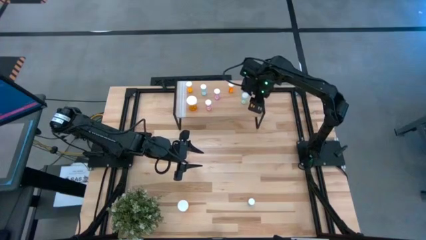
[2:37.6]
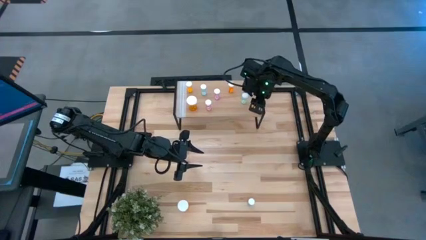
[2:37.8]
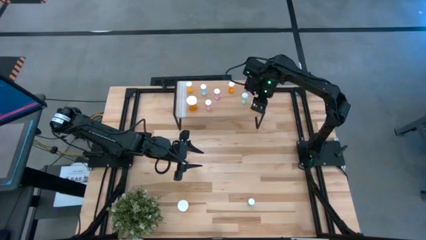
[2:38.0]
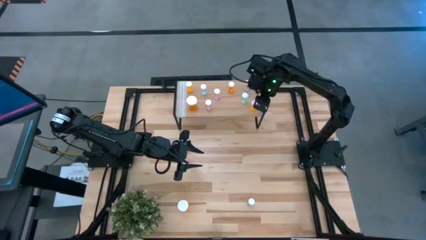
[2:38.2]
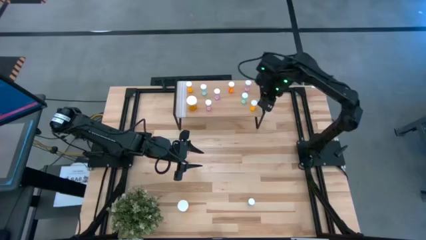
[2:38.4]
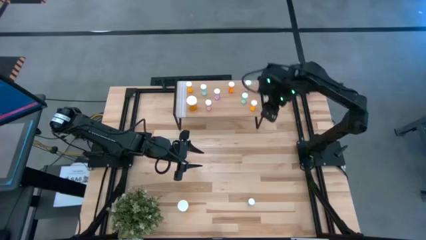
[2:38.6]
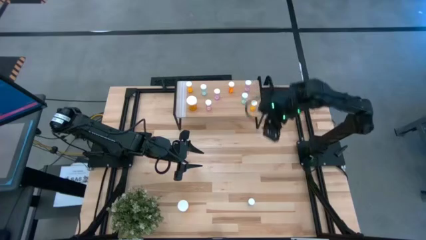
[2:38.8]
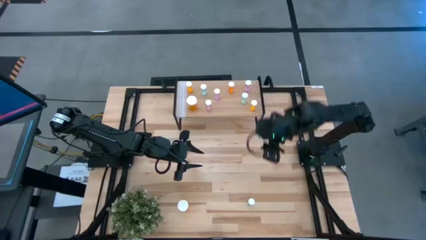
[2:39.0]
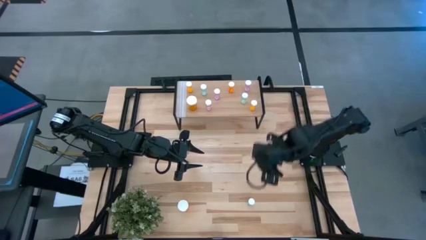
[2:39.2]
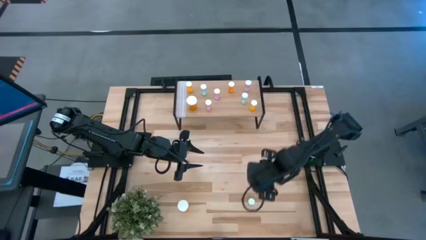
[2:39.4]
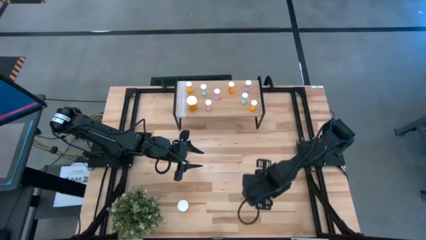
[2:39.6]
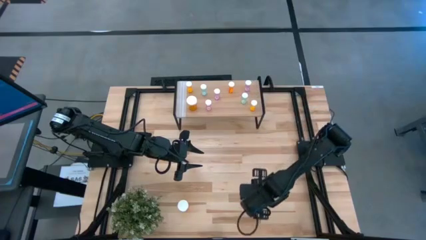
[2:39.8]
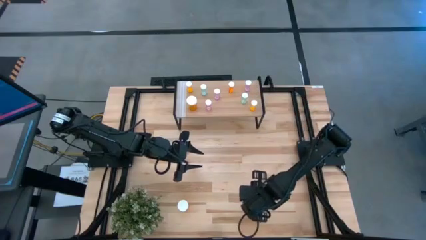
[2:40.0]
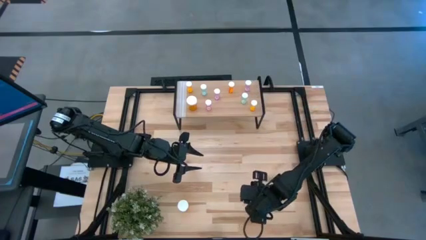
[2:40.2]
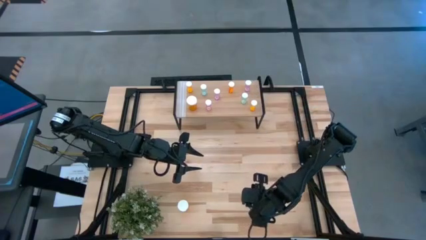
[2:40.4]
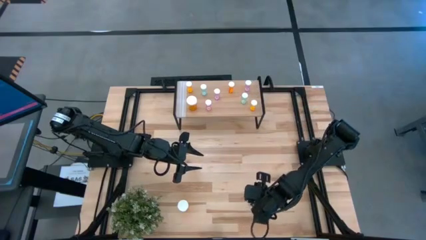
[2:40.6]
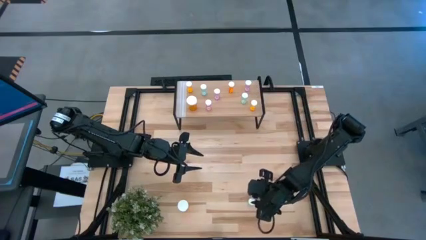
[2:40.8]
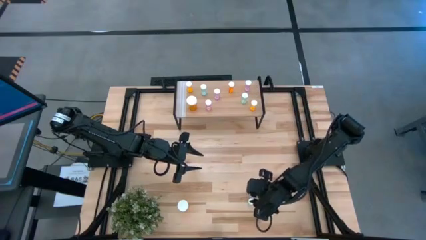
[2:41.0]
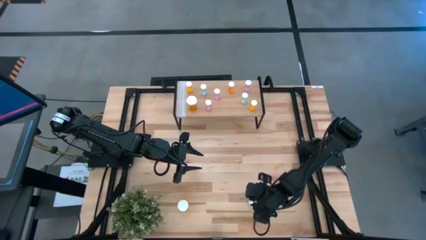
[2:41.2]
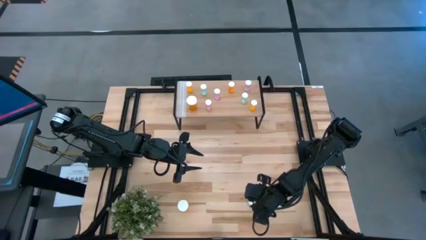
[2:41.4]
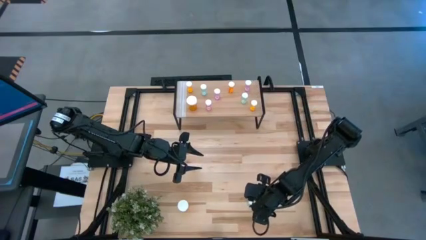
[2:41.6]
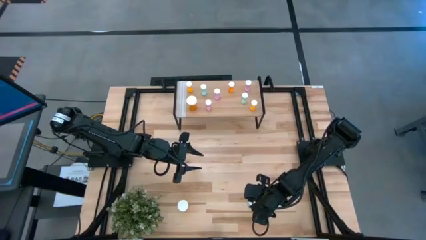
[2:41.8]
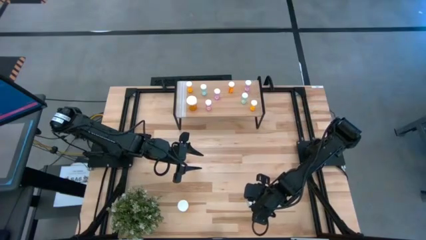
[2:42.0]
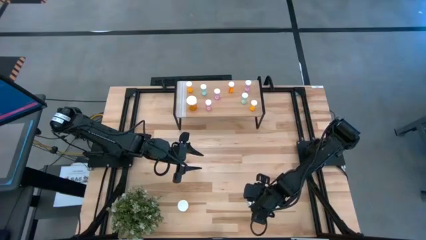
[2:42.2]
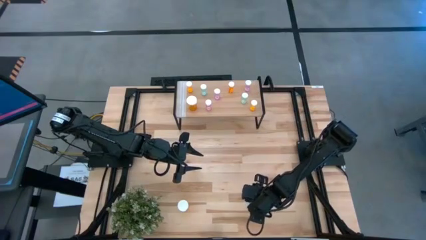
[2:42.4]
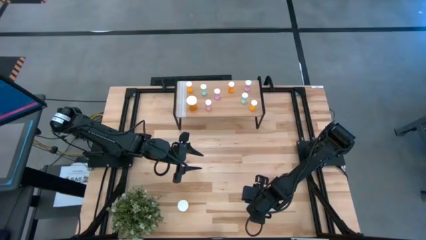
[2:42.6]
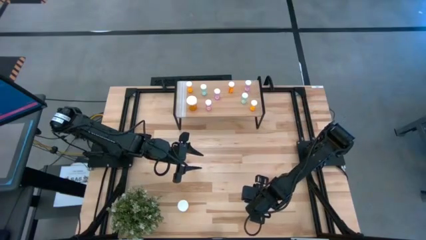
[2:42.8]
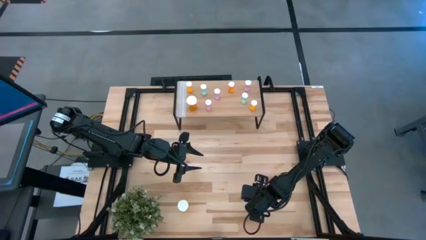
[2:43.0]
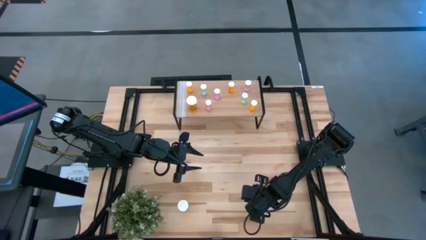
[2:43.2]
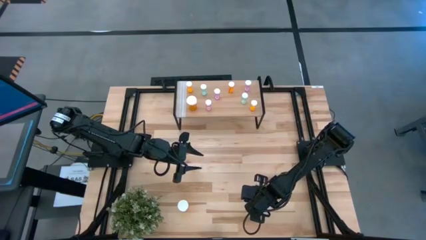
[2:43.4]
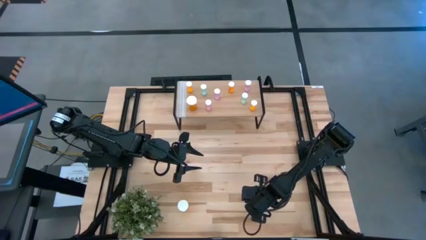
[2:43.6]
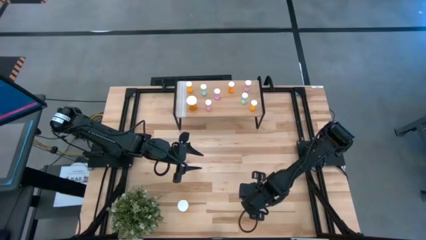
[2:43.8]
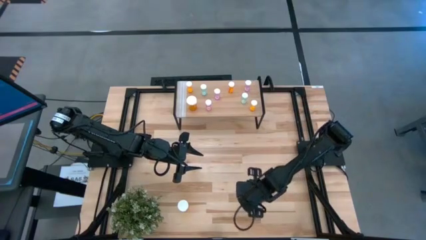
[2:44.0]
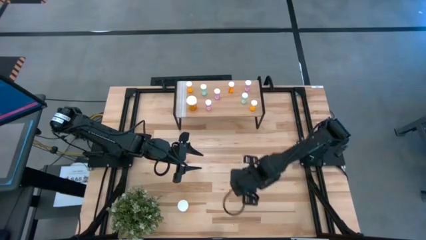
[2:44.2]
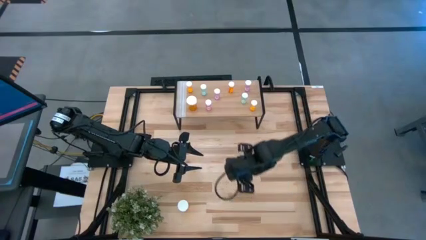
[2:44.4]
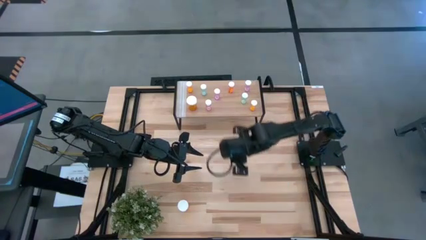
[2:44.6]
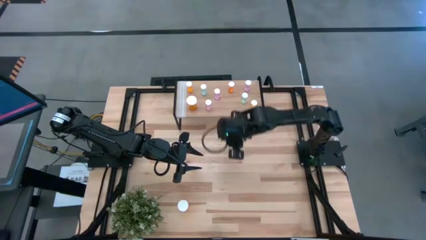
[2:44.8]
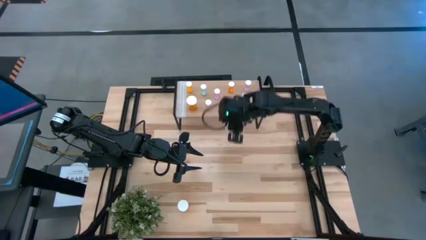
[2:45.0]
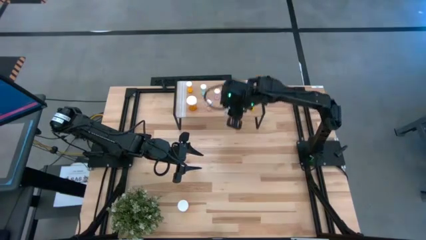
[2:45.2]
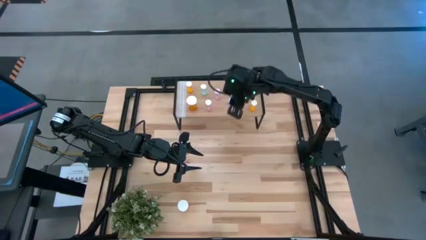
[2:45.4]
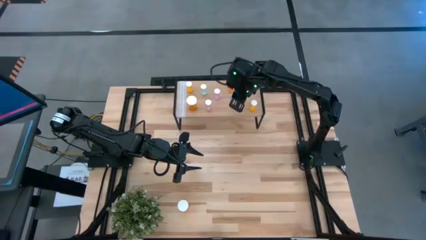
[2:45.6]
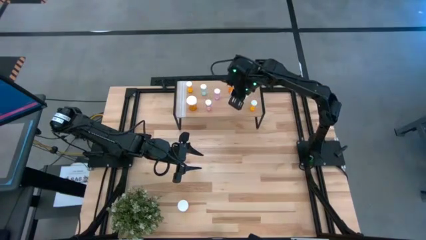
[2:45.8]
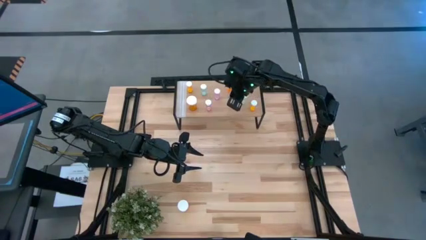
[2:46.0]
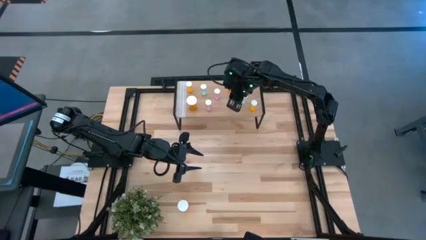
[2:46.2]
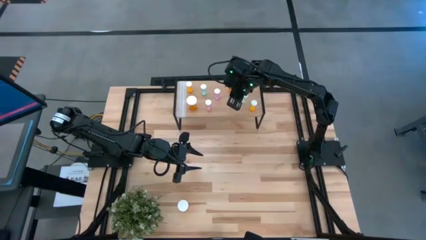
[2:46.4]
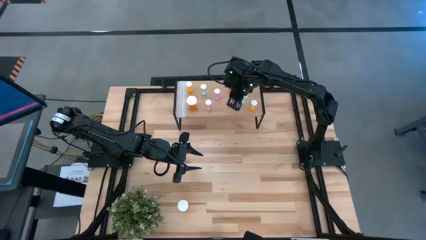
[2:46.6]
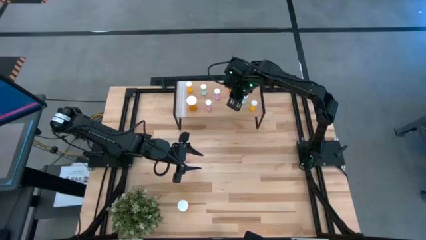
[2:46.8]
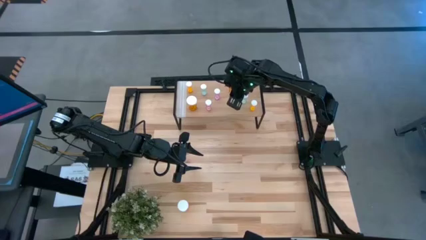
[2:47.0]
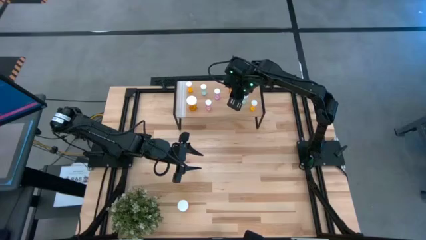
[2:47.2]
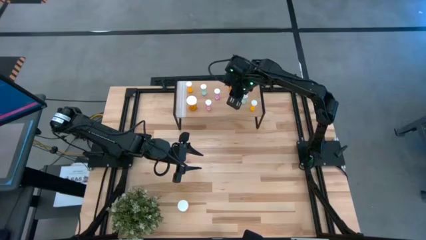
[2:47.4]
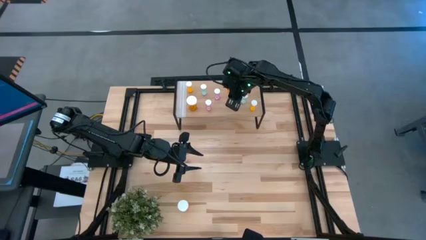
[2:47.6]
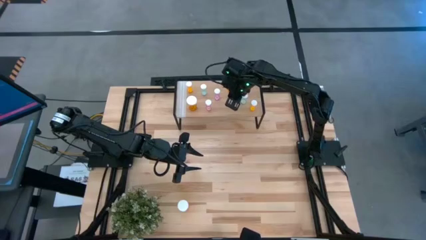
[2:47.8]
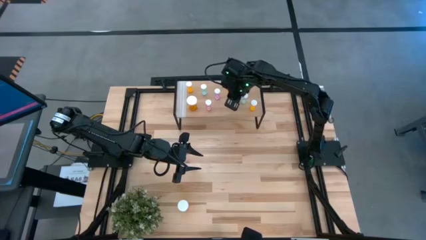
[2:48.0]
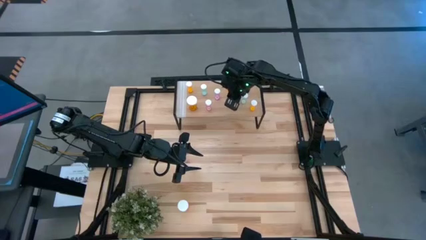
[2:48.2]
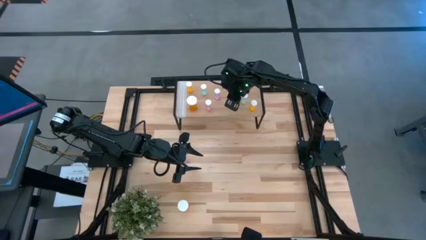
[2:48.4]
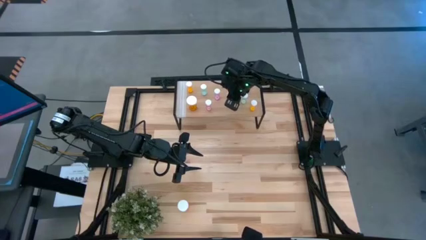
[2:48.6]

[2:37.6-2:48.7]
Task: Pick and place medicine bottles onto shelf by color
Put the blue small pill bottle on the shelf

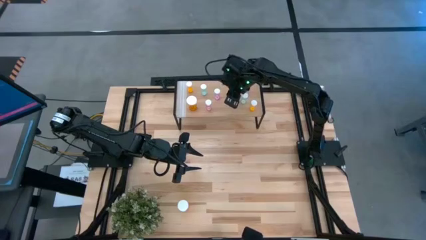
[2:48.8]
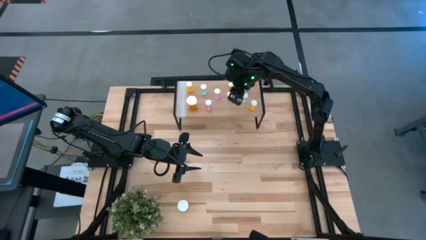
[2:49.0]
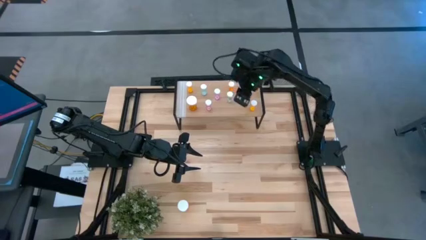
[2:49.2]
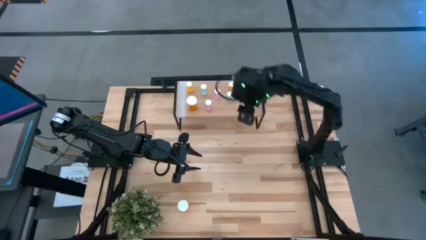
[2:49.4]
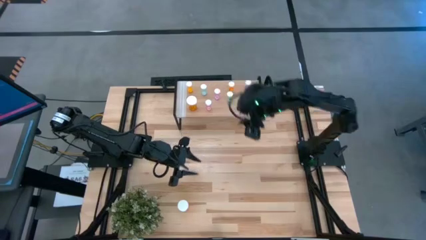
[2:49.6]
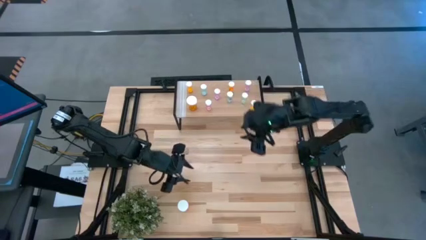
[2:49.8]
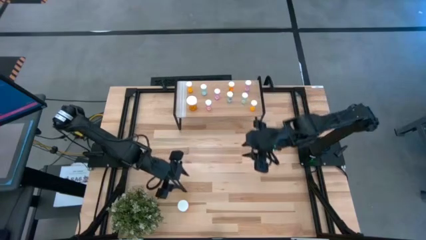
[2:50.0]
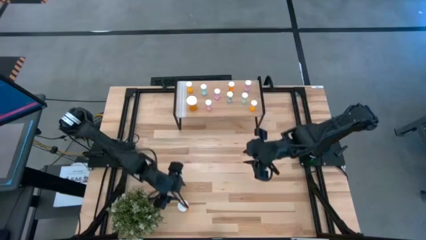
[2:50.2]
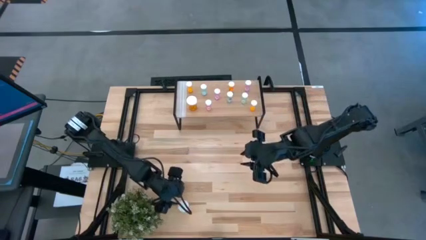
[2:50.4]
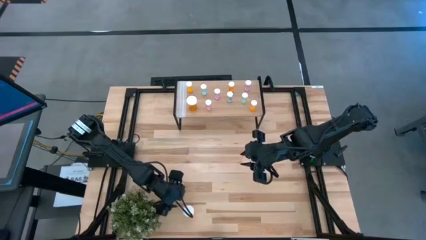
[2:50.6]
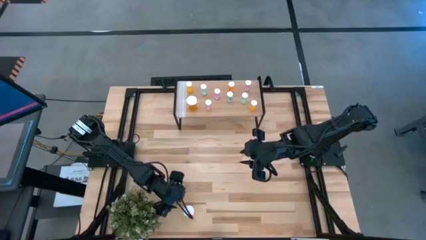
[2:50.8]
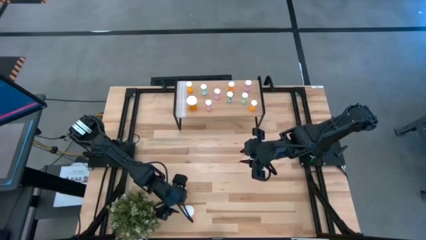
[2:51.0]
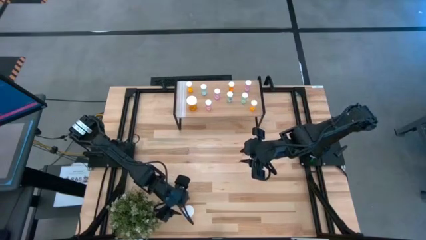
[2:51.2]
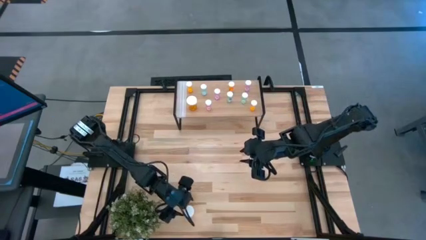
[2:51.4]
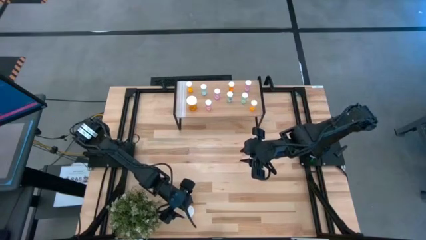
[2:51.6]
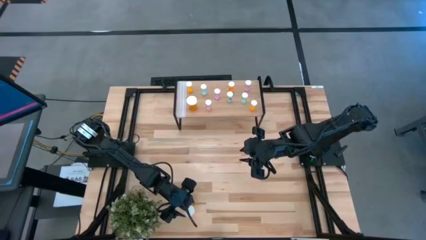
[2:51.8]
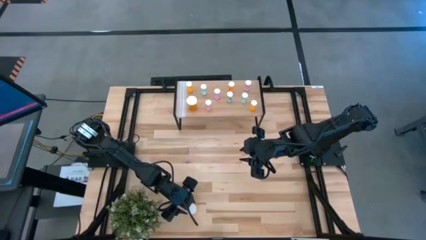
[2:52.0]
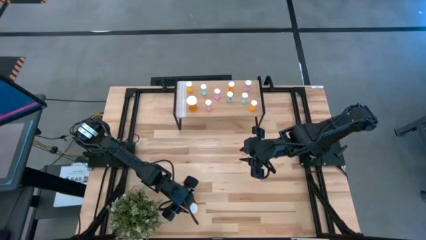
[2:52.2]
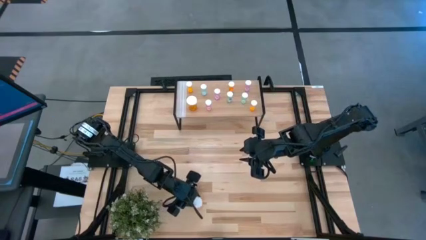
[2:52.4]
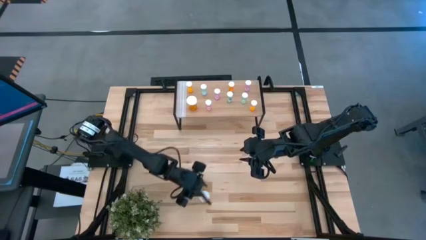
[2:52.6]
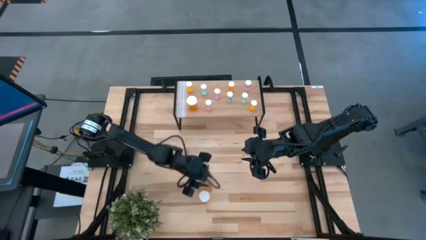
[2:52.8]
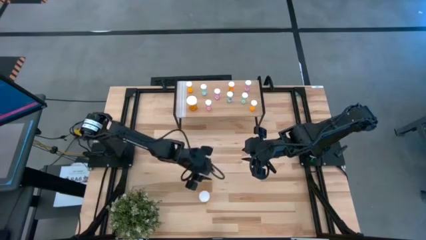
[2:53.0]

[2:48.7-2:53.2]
Put the big orange pill bottle on the shelf
